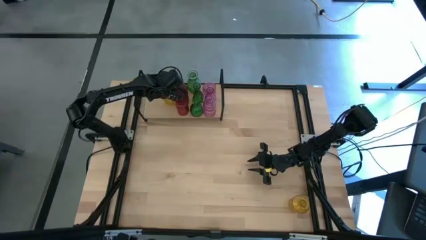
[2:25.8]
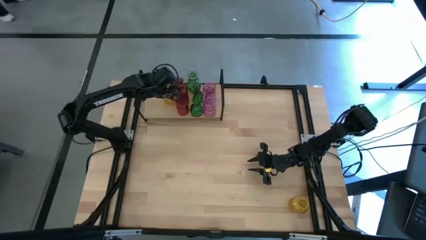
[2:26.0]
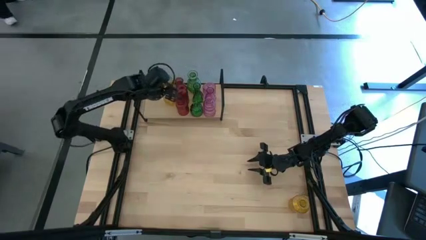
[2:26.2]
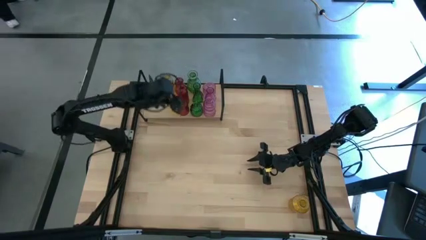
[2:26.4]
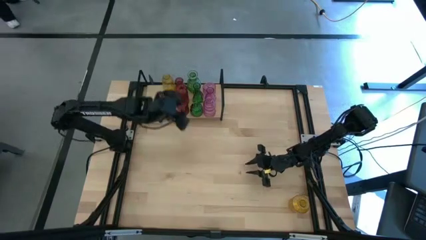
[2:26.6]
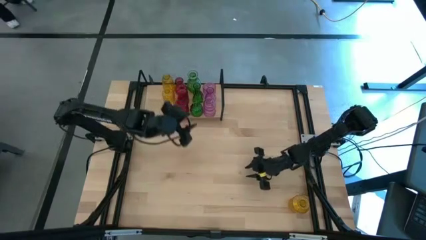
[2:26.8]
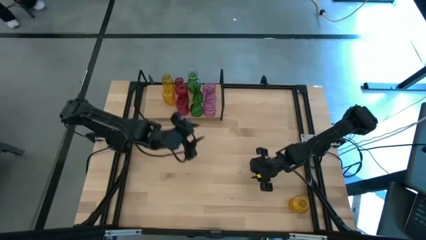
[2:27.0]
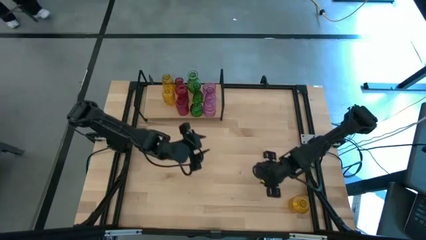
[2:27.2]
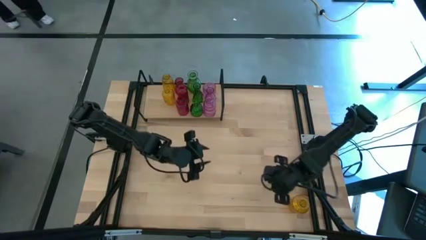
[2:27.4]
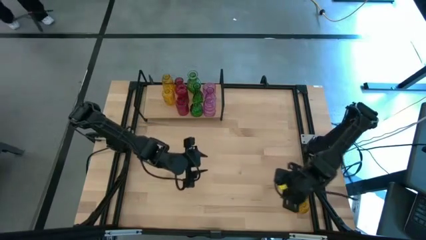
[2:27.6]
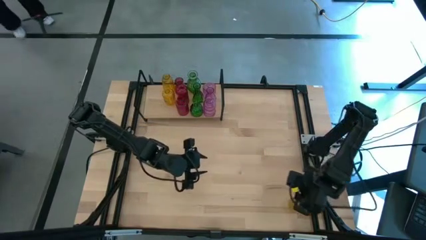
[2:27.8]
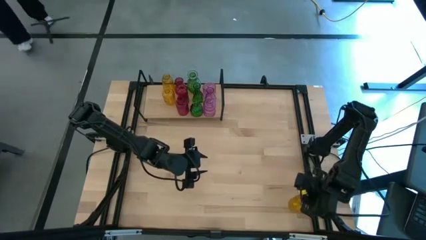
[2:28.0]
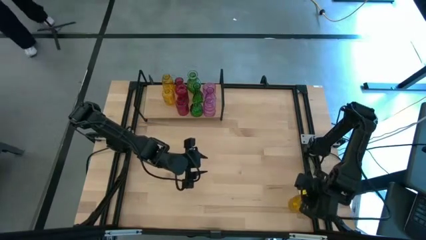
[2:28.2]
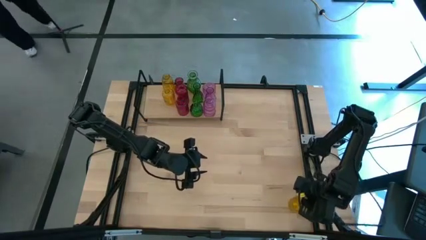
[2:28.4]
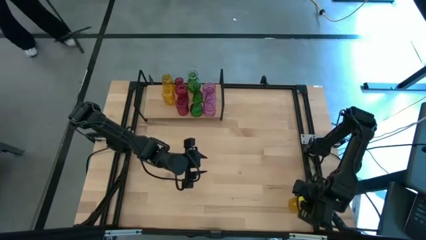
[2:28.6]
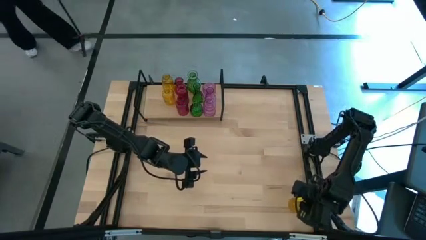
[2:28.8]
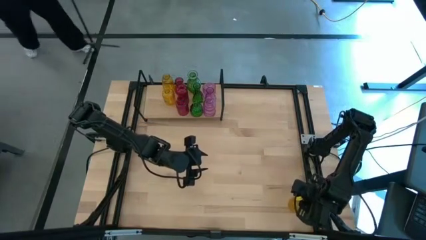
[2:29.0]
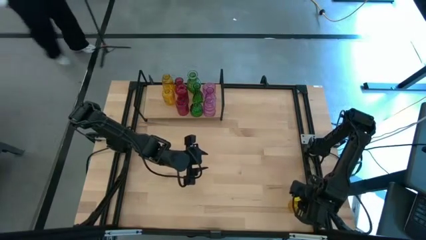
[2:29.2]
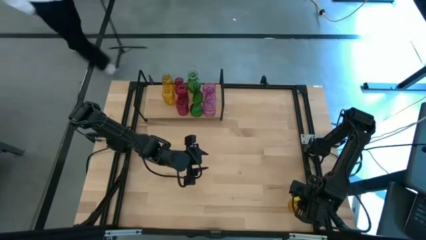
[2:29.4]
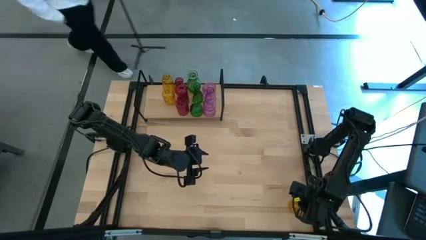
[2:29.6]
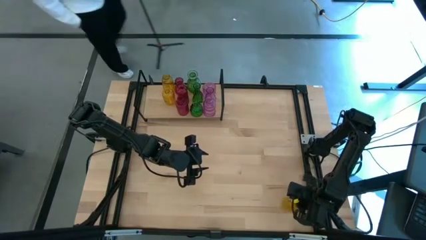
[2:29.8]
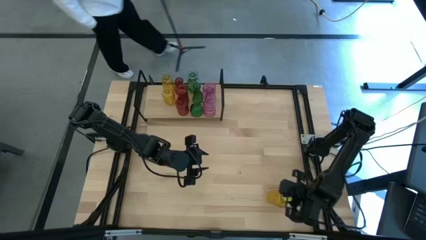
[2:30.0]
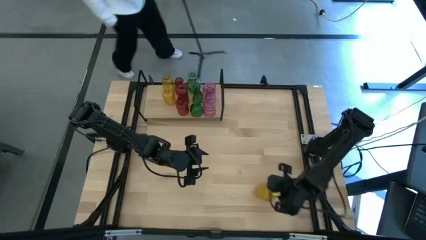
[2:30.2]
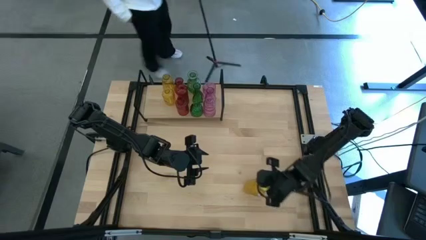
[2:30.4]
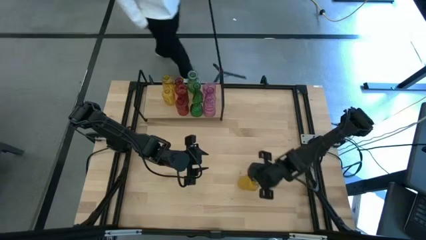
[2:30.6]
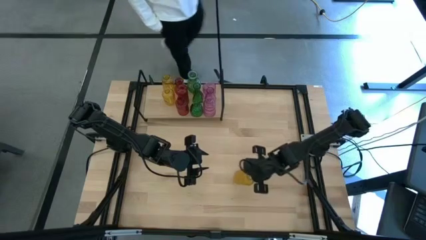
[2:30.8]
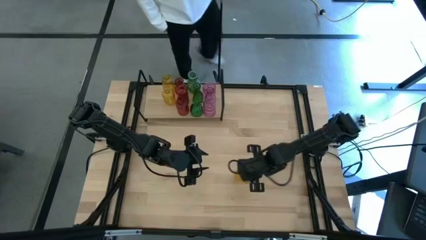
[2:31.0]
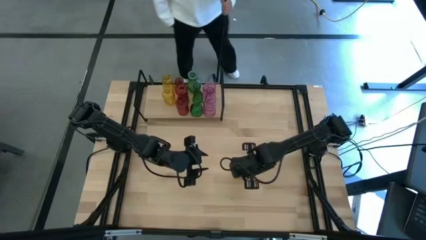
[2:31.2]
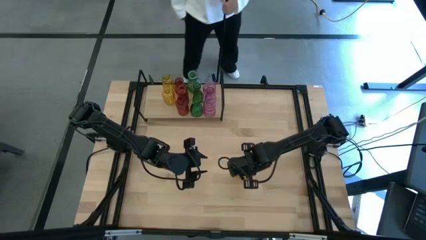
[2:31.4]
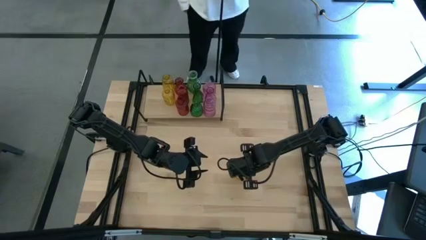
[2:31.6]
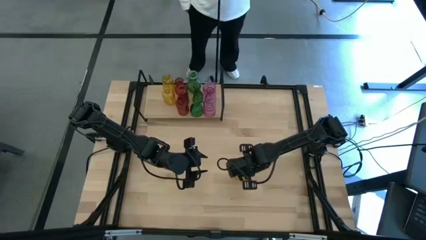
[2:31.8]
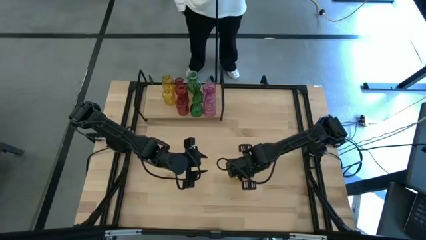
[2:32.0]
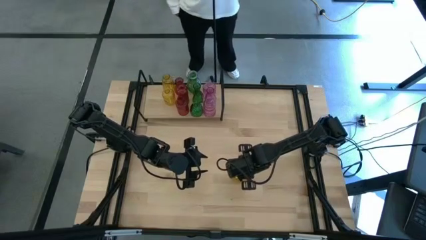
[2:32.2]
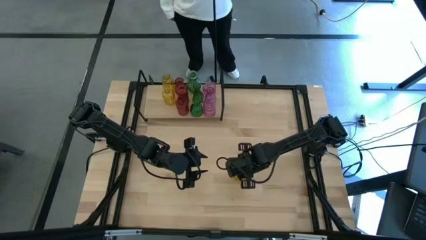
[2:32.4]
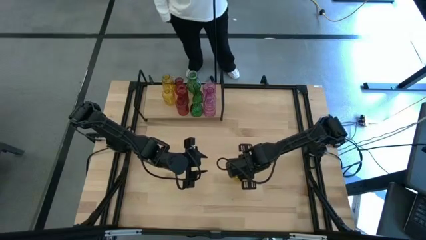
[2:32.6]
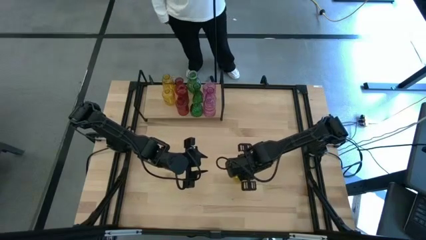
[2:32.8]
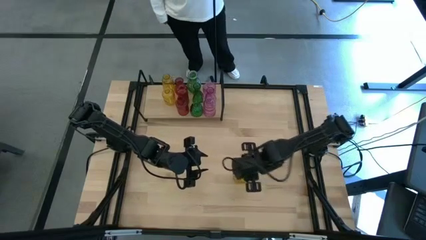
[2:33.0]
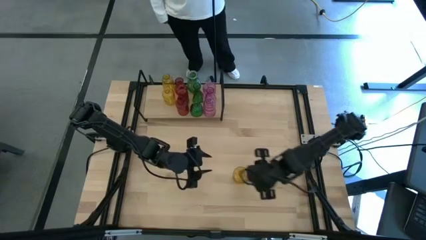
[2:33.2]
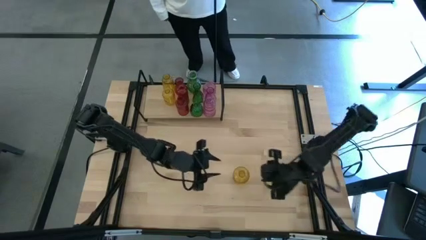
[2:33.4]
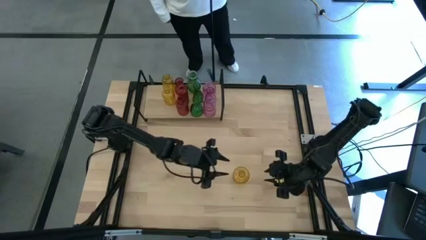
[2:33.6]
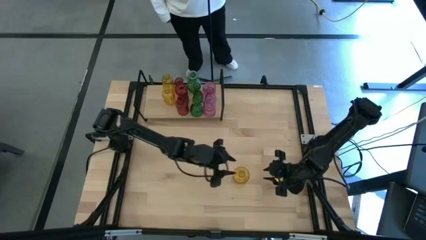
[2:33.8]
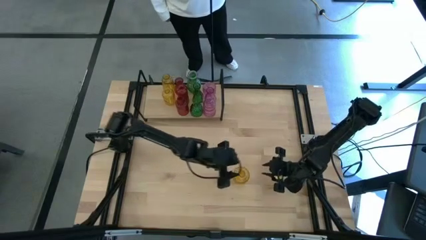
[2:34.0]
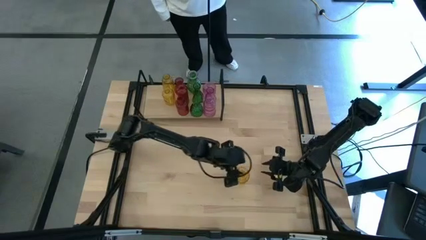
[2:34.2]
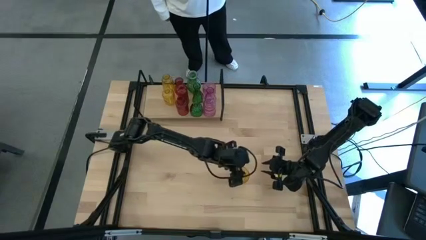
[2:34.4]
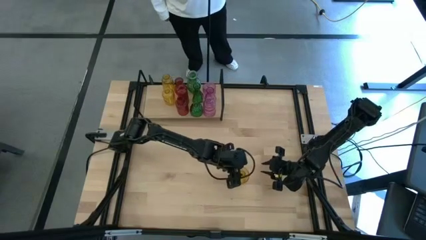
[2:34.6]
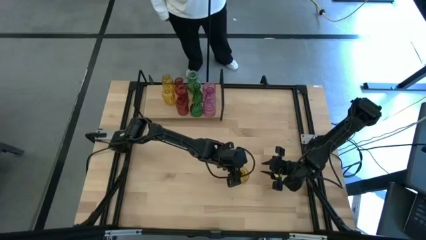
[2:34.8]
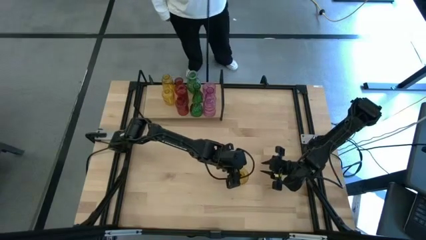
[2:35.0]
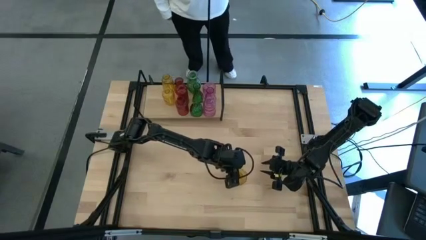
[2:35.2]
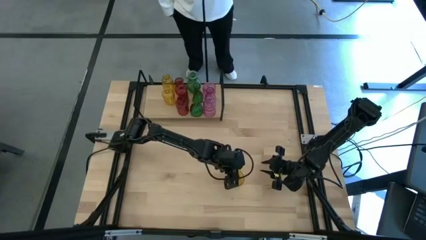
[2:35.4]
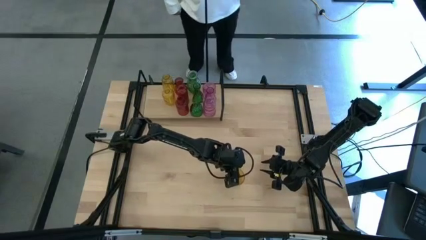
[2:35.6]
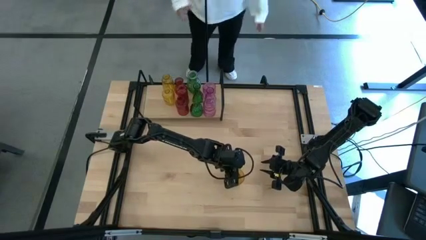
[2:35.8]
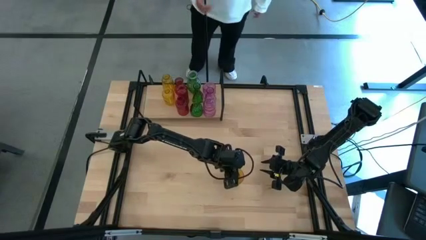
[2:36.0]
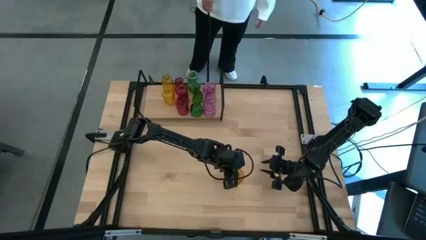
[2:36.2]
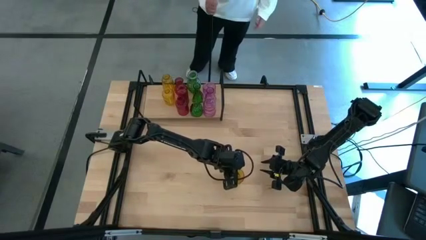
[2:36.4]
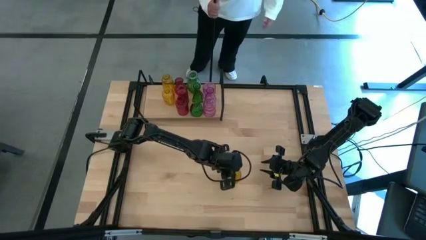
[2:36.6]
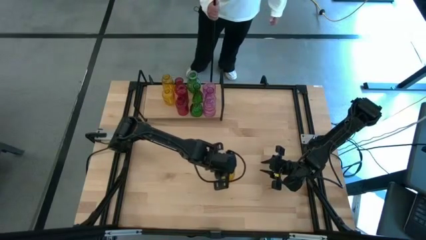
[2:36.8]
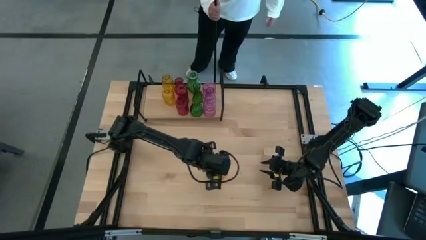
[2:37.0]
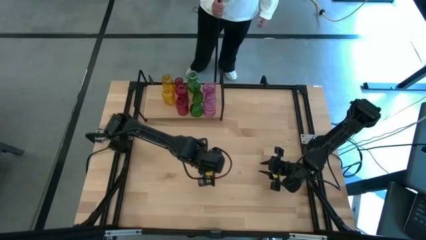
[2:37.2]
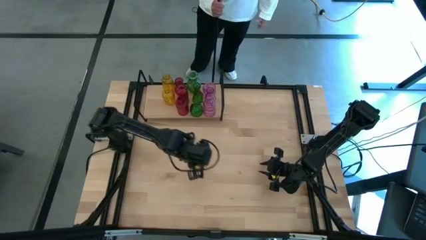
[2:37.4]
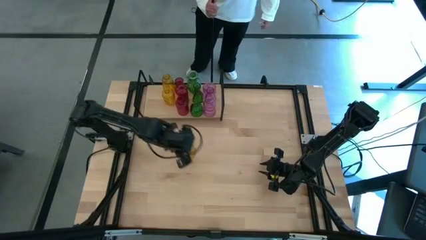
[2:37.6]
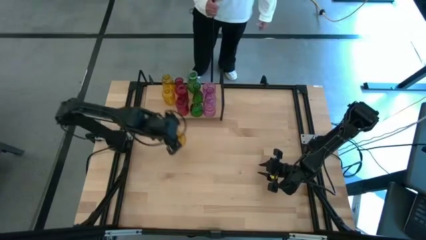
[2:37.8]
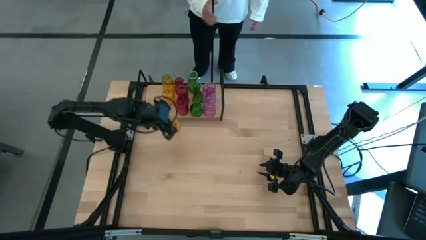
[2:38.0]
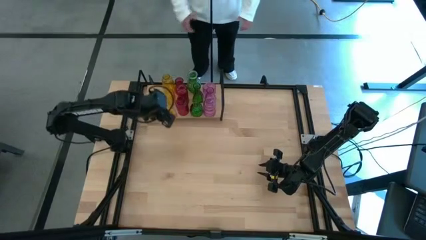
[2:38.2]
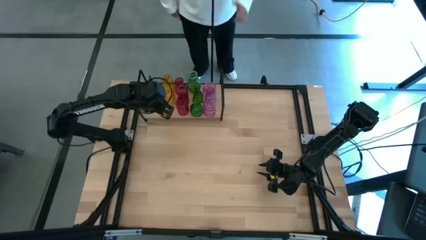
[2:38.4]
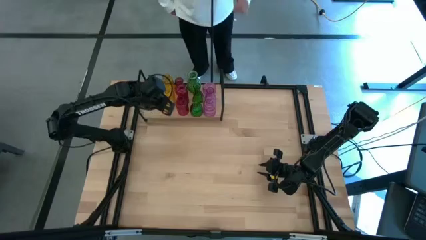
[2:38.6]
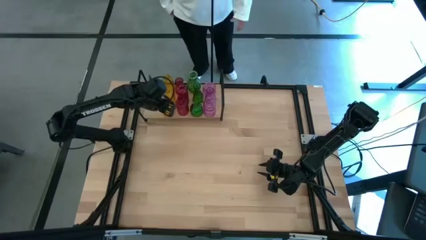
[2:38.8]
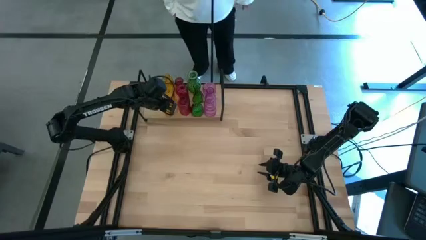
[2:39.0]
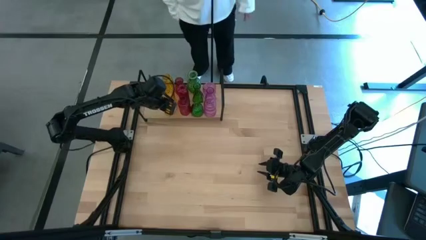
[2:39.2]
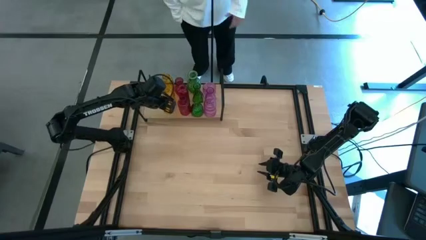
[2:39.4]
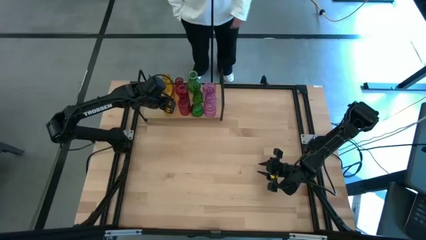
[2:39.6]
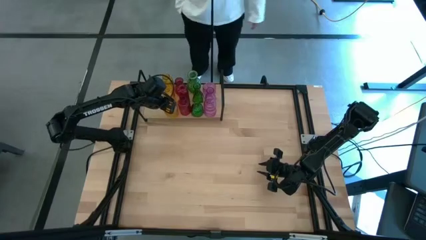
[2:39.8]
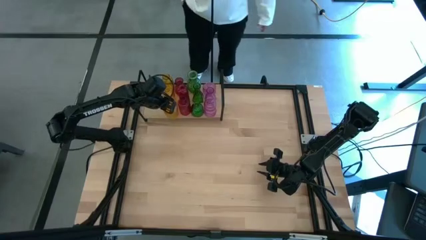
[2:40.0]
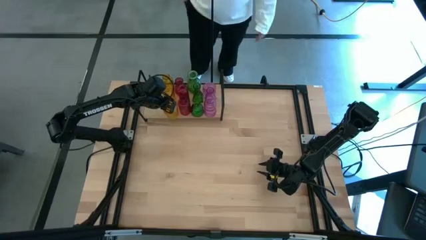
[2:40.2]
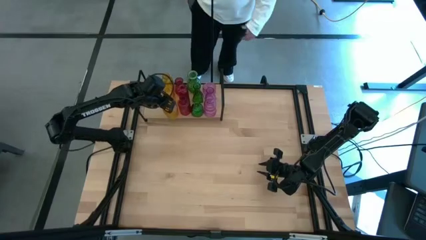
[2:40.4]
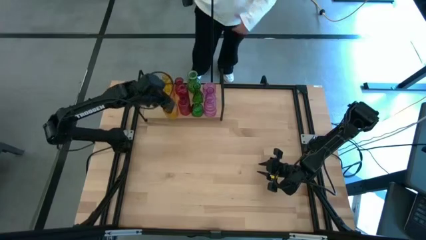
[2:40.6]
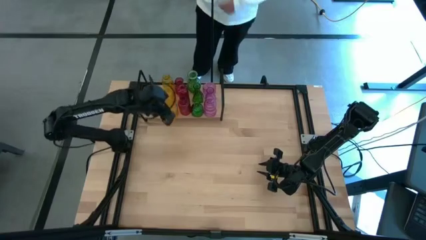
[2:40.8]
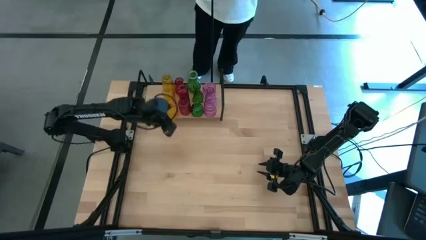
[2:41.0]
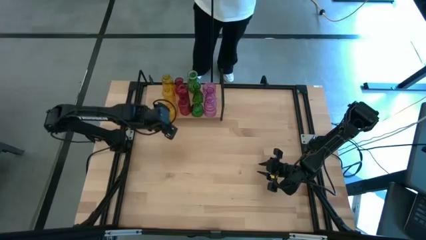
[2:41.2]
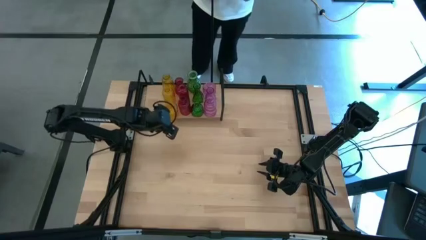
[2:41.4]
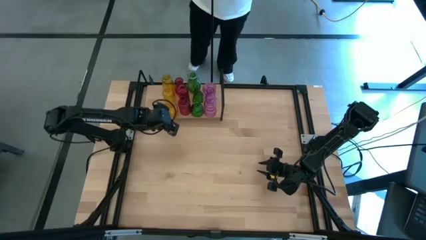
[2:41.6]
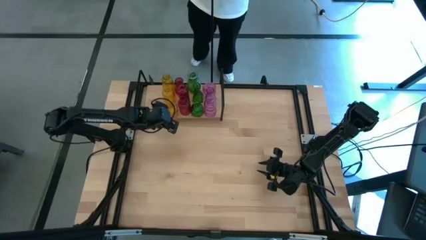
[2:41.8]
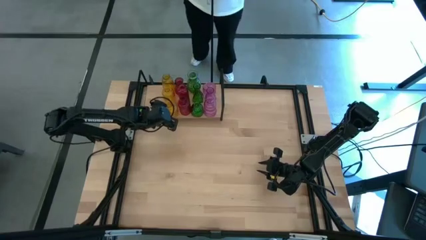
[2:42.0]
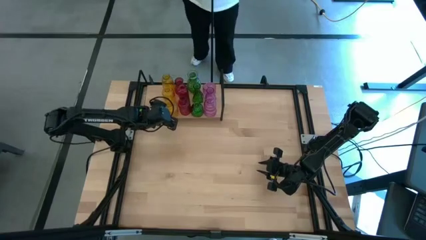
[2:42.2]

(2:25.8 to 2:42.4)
Task: sort vases onto shelf
Put the yellow vase on the shelf aligned with the other yellow vase

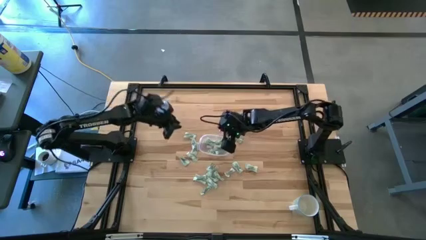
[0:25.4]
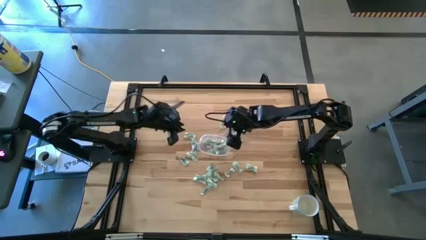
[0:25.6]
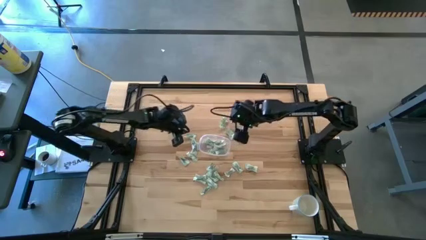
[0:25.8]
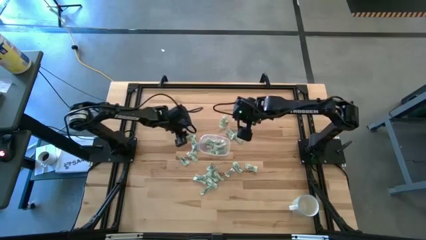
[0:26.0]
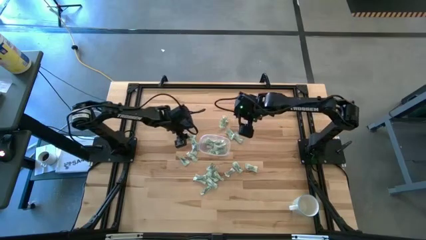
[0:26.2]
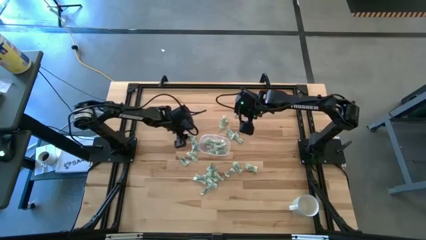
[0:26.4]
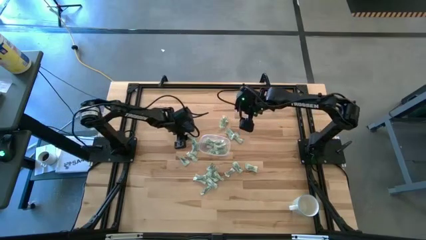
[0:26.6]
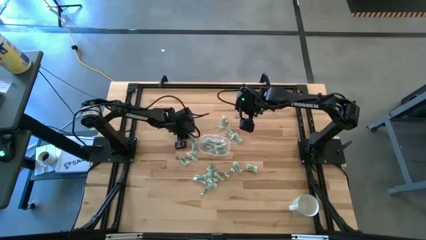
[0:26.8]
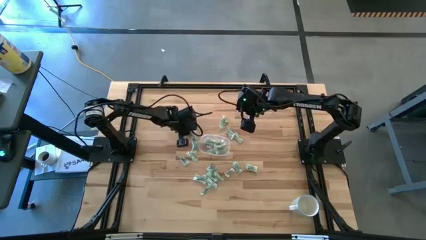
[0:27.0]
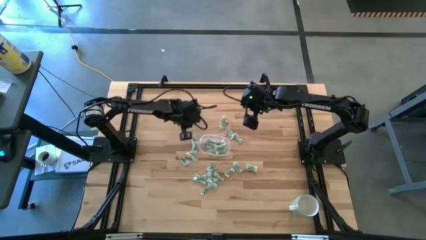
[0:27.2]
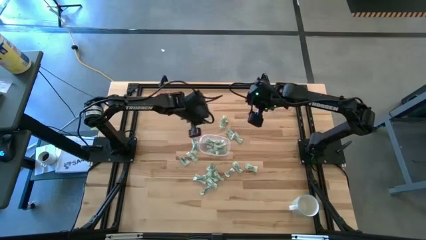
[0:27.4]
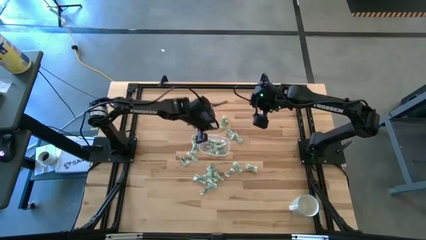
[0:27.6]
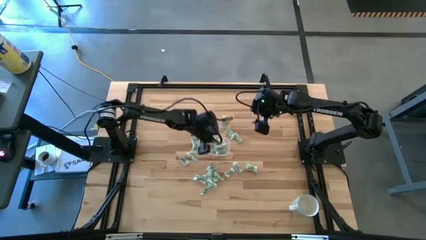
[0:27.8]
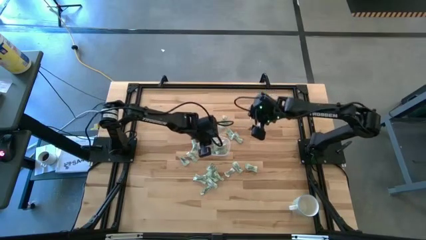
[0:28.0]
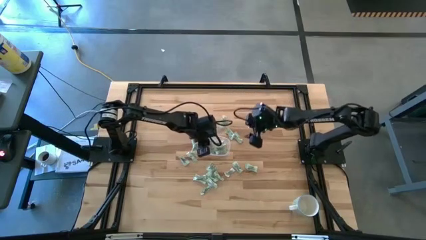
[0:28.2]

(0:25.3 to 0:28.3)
Task: Pick and place Stevia / Truvia into bins
Put the stevia packet into the transparent container
